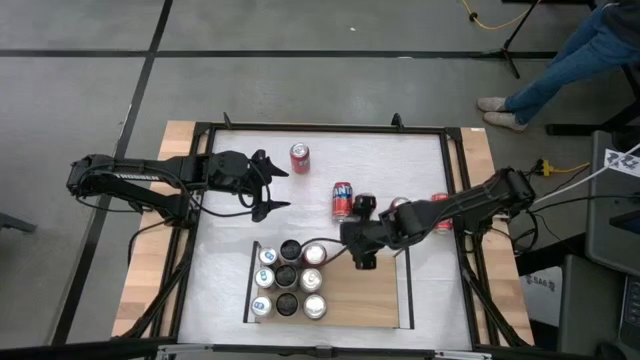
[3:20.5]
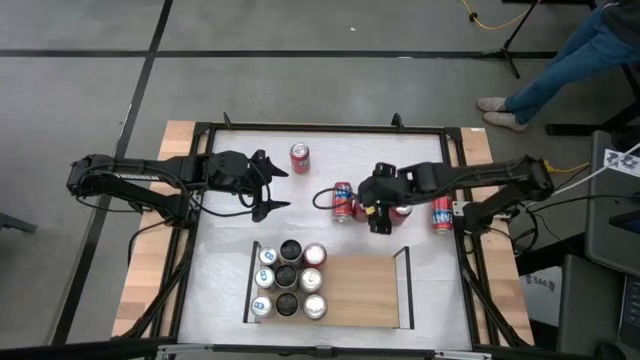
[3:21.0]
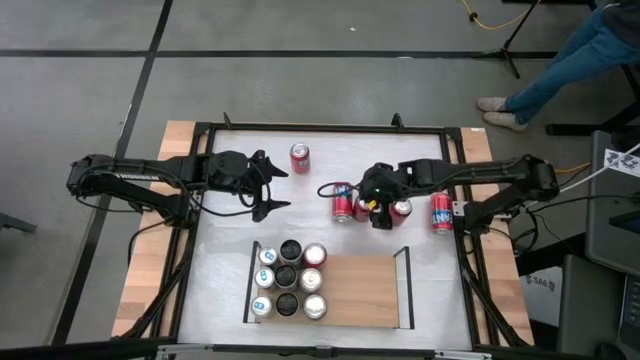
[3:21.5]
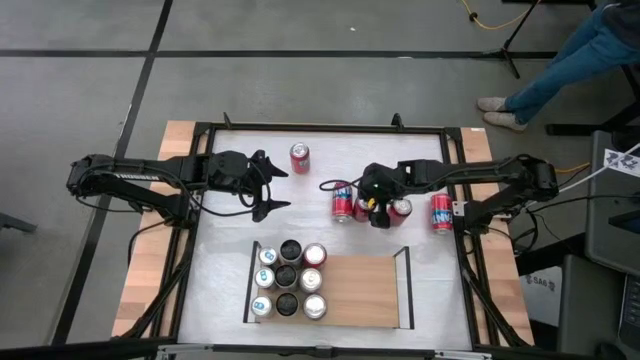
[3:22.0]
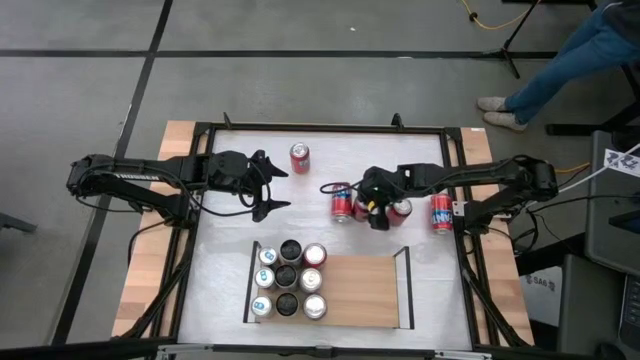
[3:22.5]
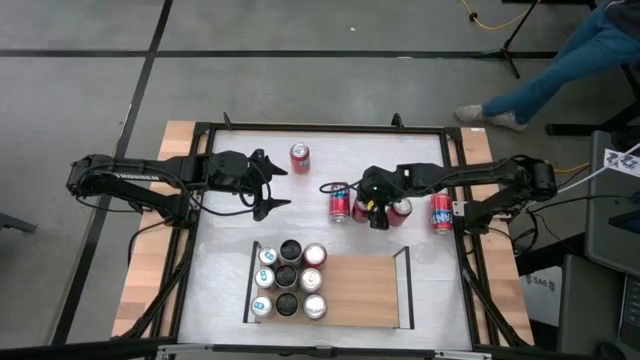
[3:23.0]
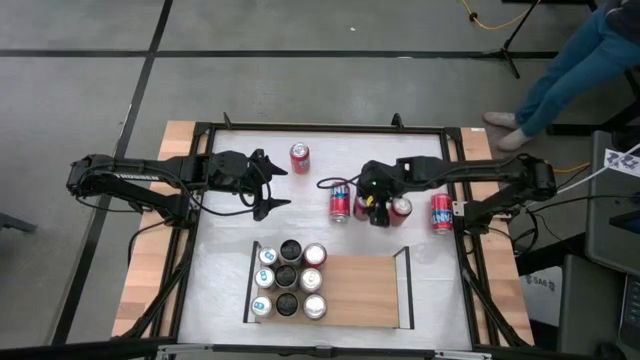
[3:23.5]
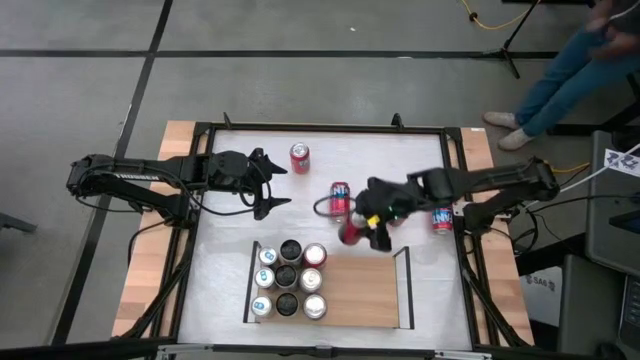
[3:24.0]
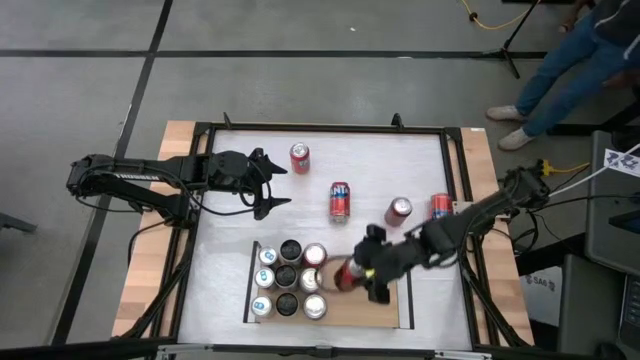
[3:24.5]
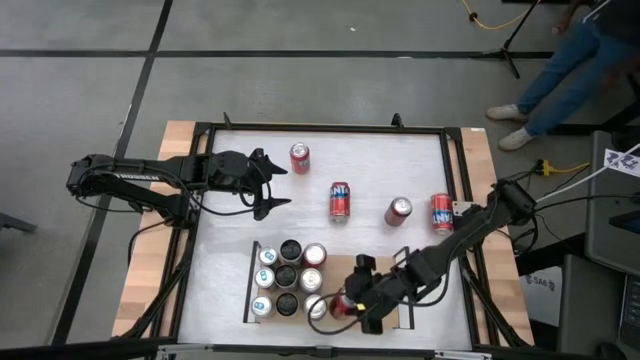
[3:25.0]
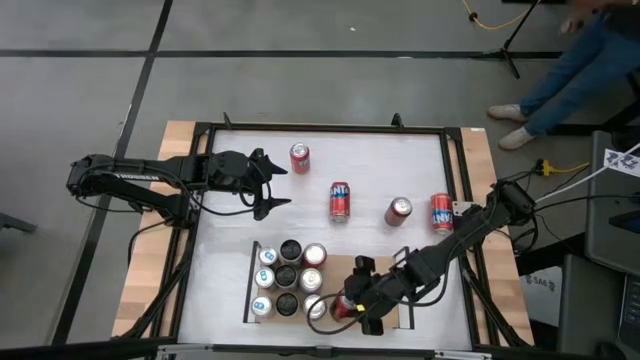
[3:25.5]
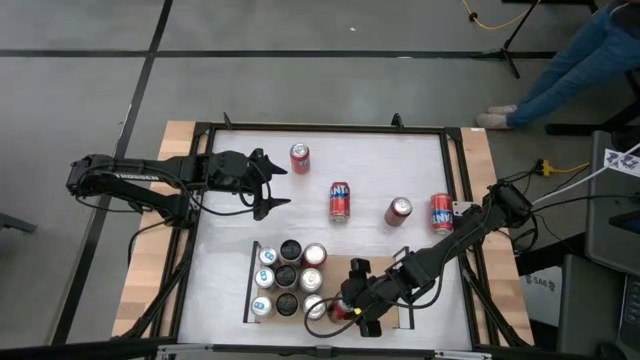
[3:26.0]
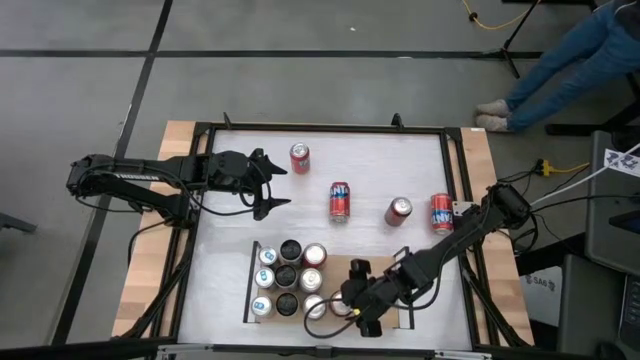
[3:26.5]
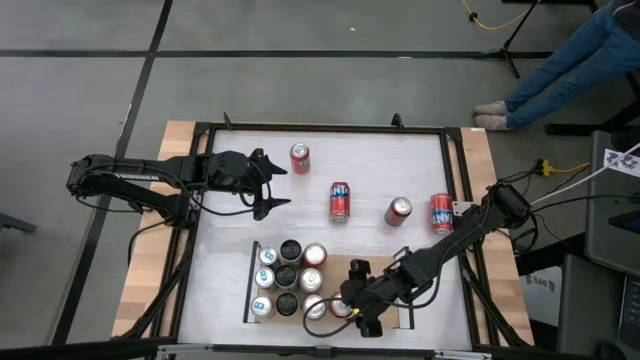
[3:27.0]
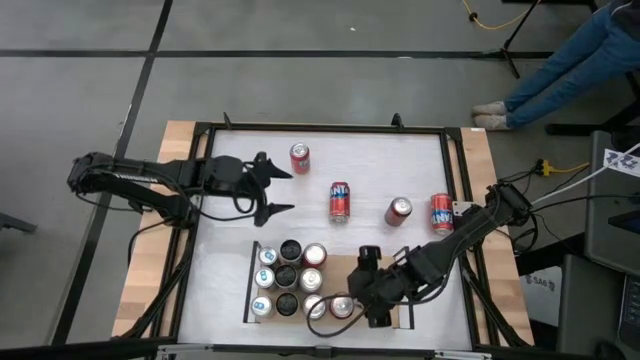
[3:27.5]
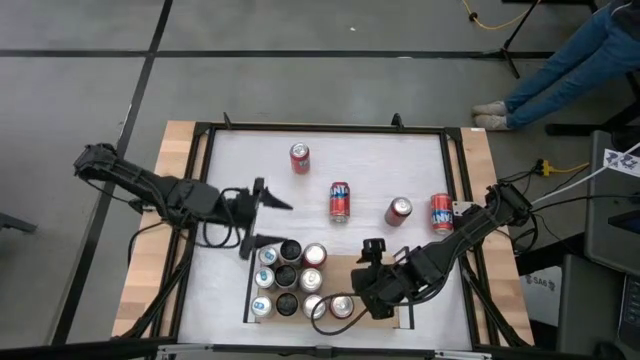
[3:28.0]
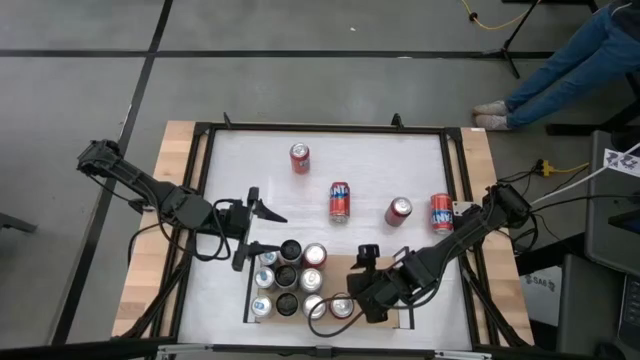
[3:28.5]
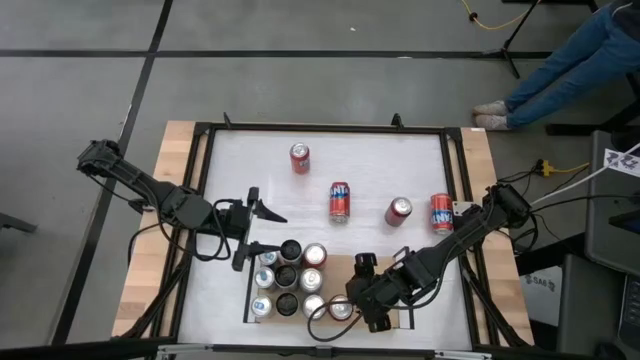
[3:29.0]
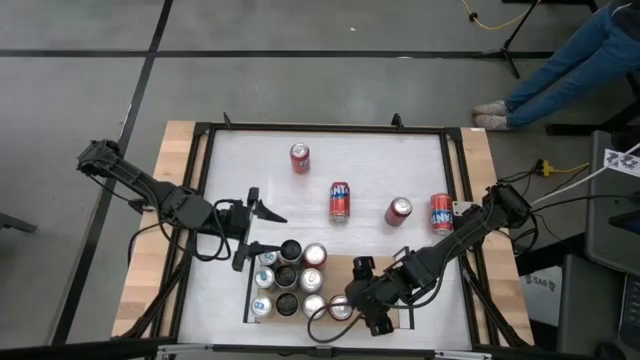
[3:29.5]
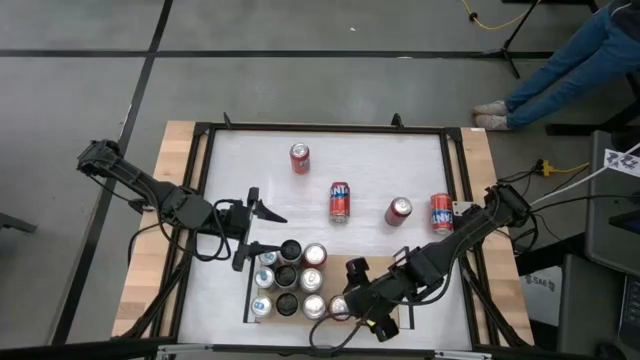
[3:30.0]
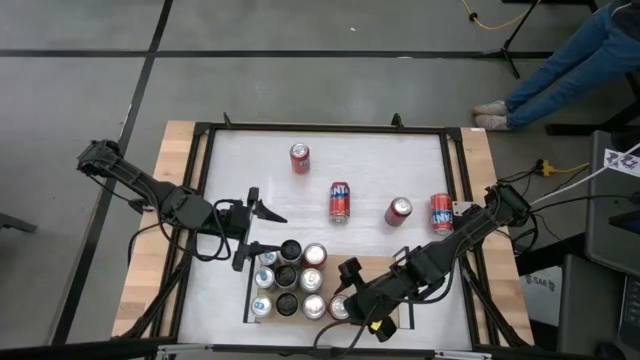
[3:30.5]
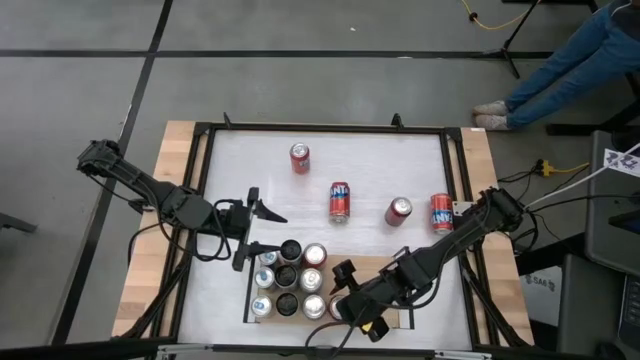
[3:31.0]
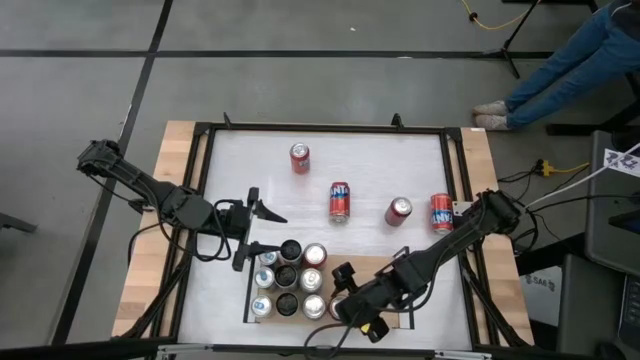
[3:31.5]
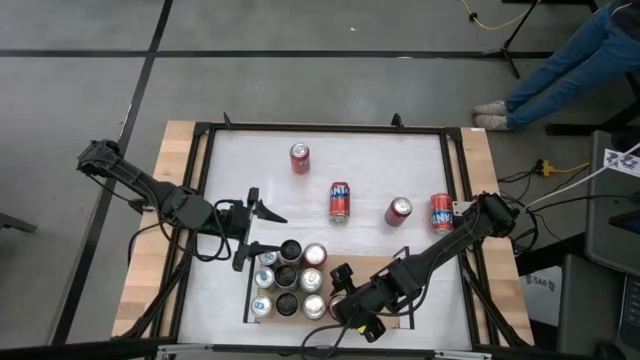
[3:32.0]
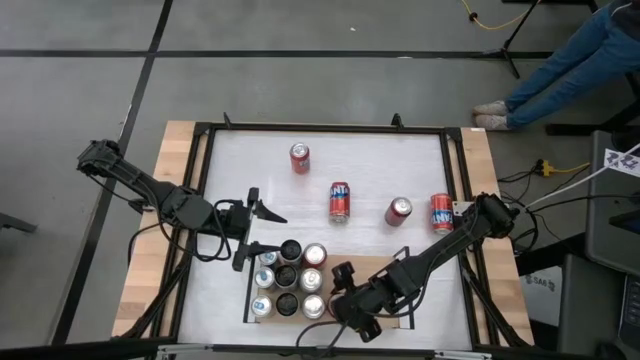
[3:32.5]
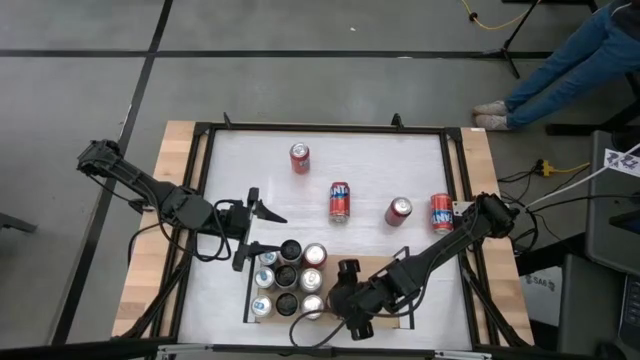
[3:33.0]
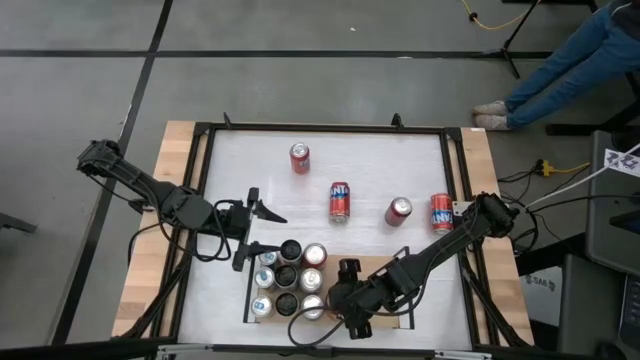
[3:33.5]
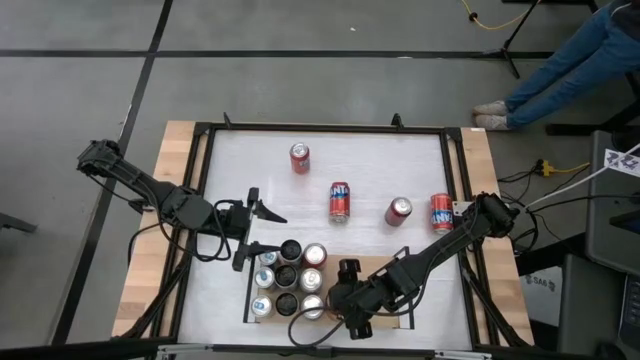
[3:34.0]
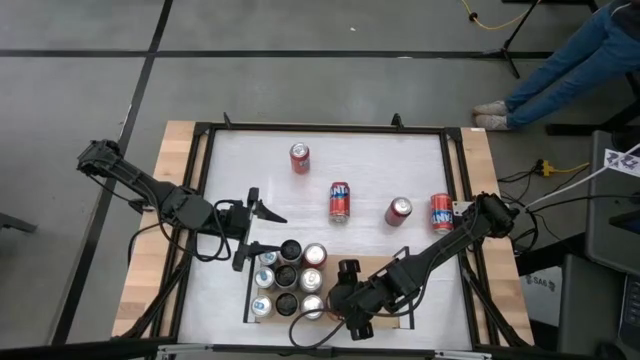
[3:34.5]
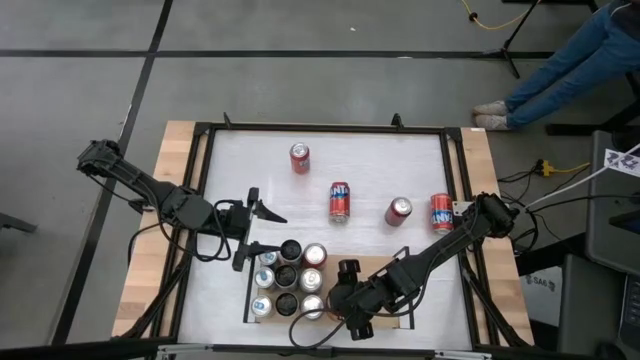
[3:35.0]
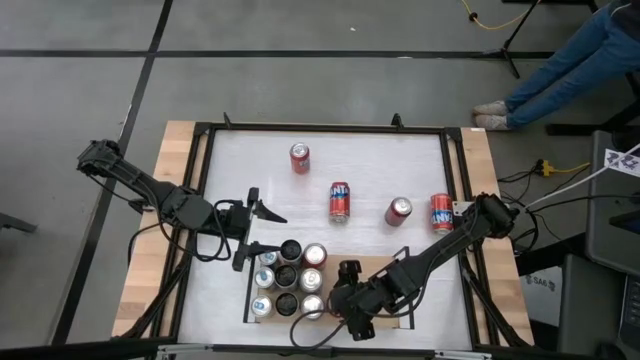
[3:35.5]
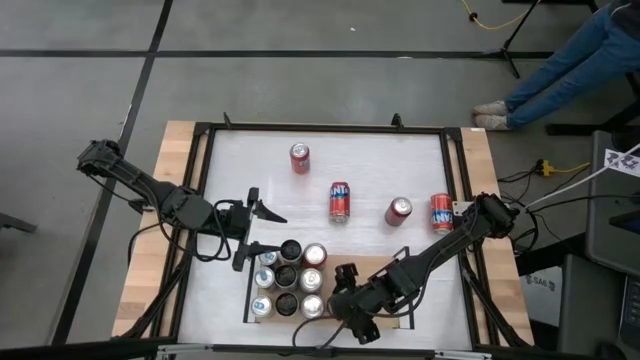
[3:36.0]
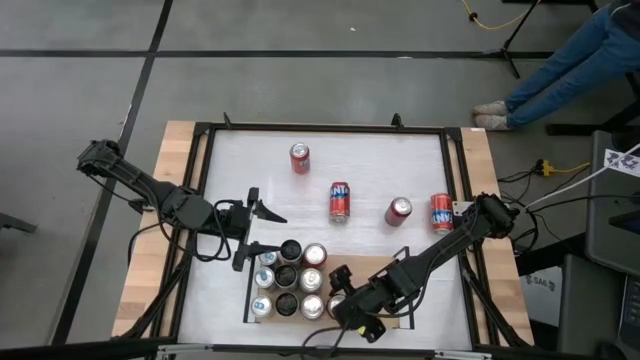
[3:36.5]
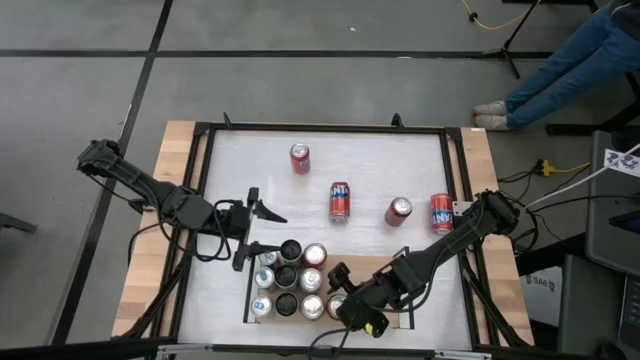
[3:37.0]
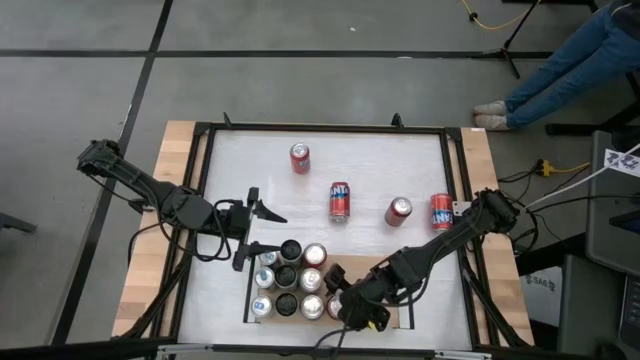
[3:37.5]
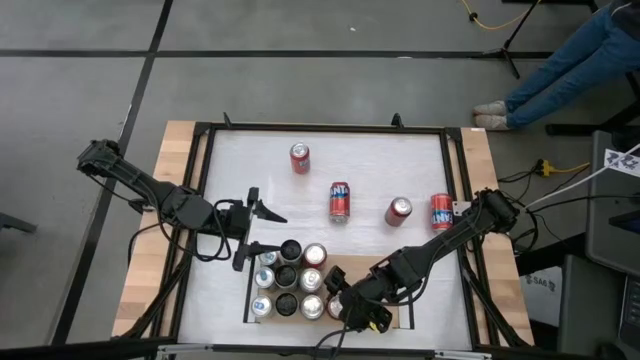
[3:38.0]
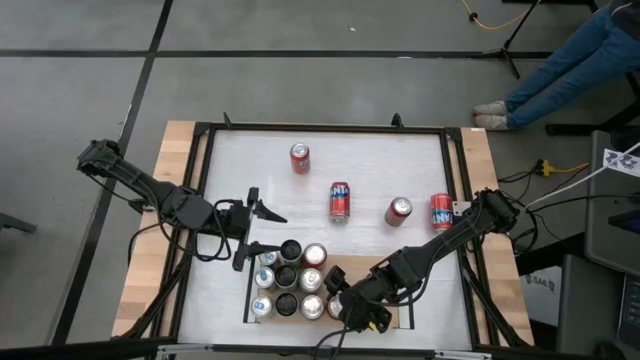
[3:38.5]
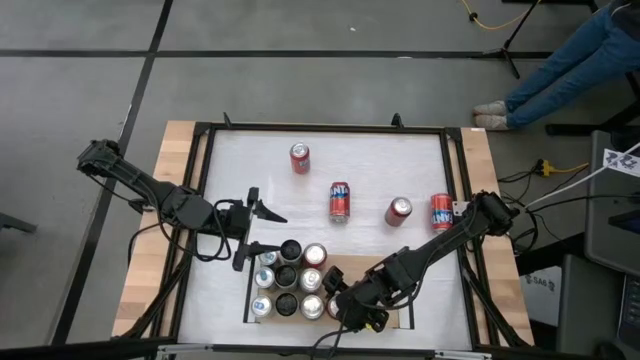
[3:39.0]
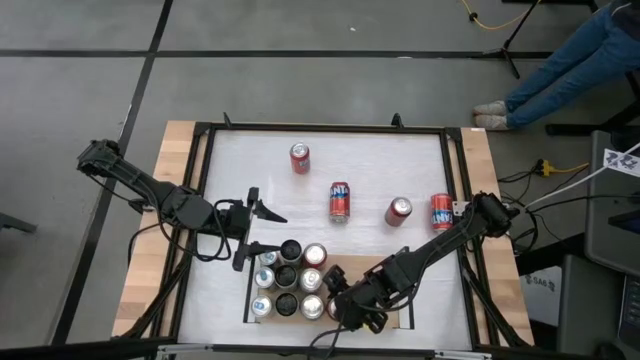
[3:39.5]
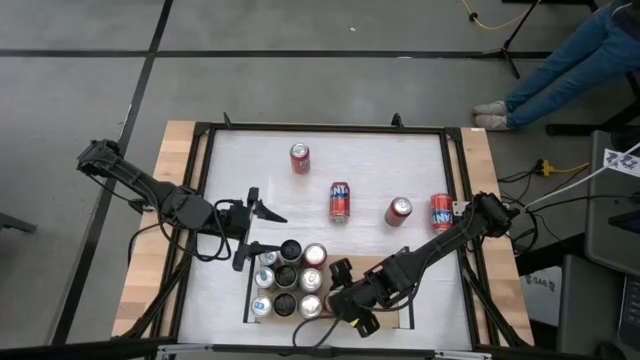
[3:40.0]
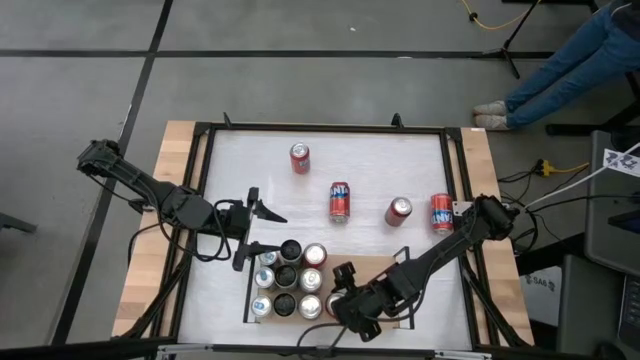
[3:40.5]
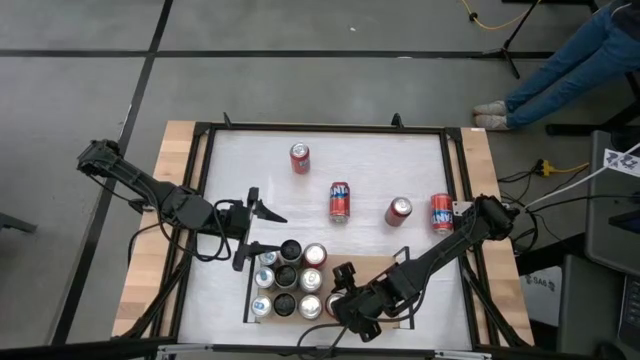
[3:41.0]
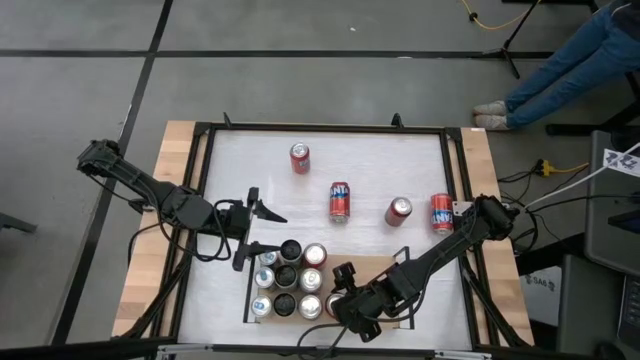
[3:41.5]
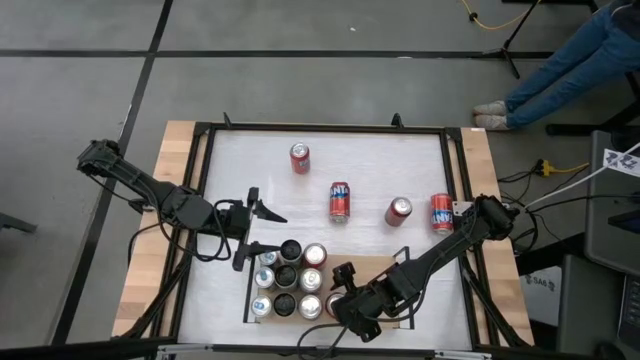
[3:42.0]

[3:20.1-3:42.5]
Task: Place canned beverage on shelf
Put the left red soda can on the shelf
